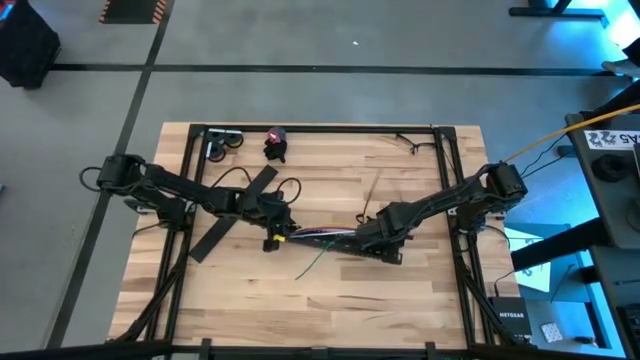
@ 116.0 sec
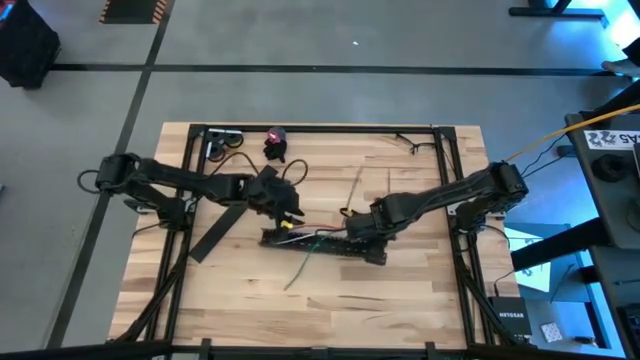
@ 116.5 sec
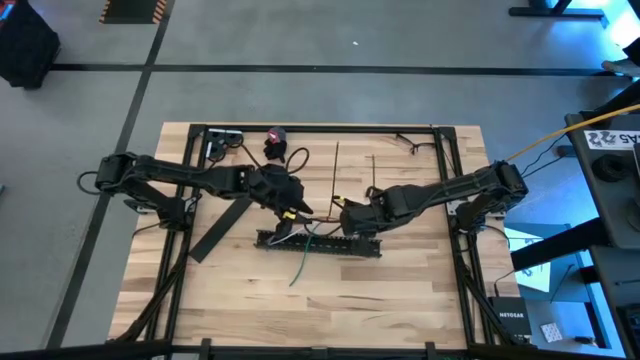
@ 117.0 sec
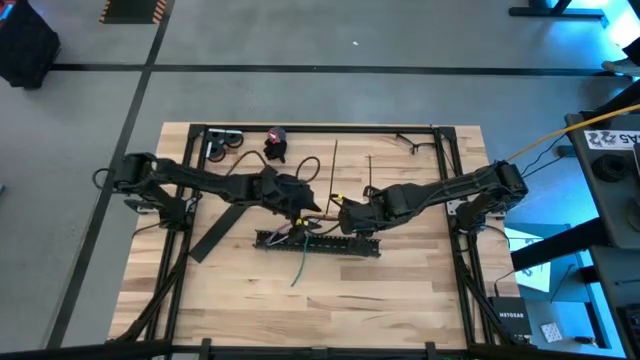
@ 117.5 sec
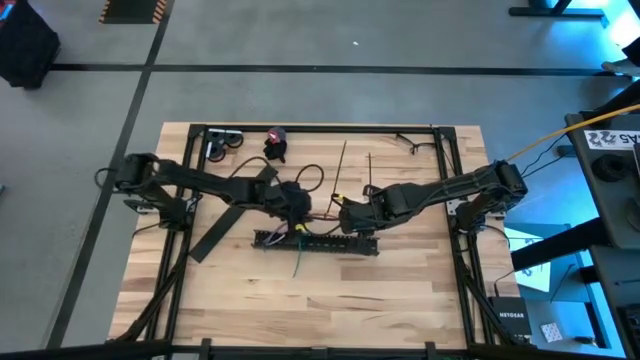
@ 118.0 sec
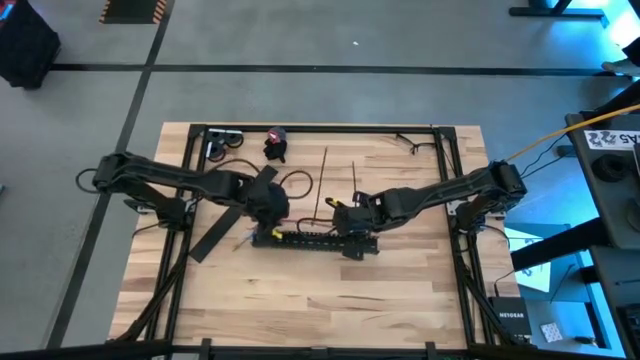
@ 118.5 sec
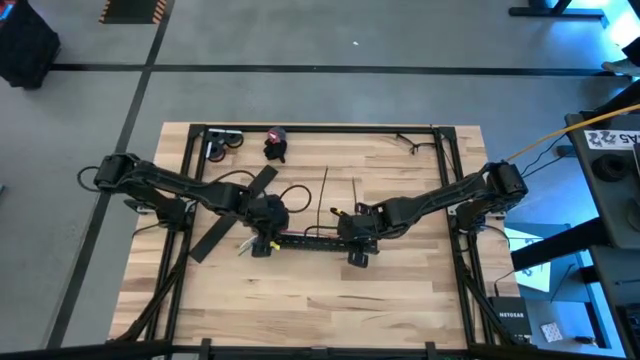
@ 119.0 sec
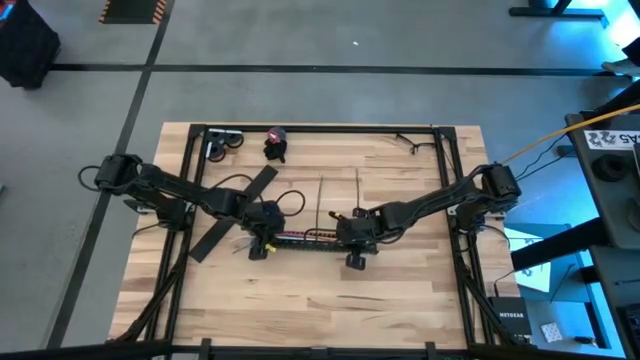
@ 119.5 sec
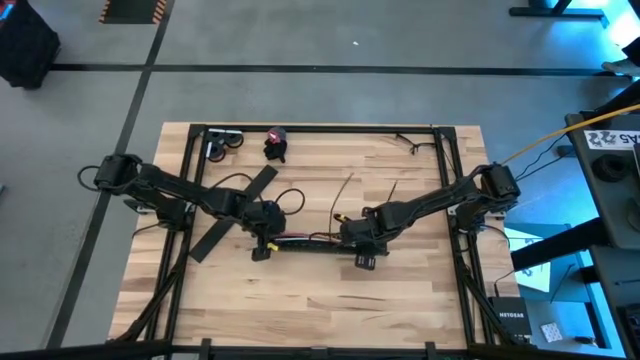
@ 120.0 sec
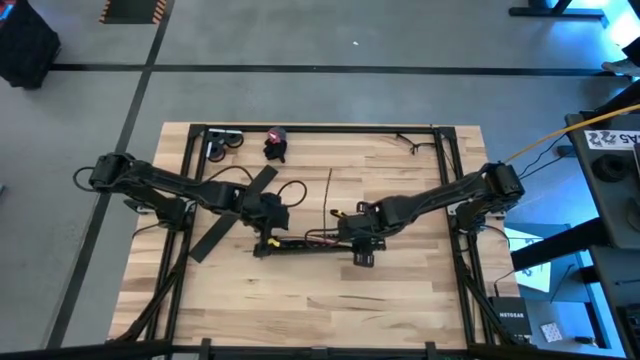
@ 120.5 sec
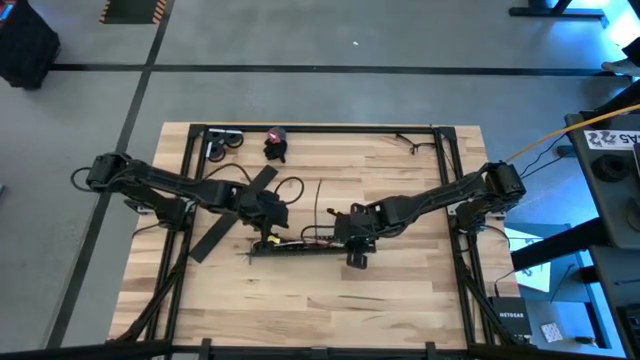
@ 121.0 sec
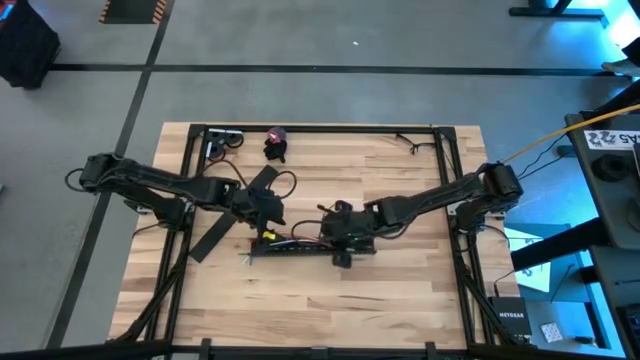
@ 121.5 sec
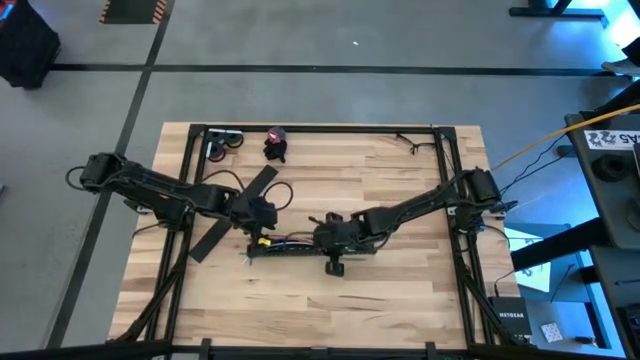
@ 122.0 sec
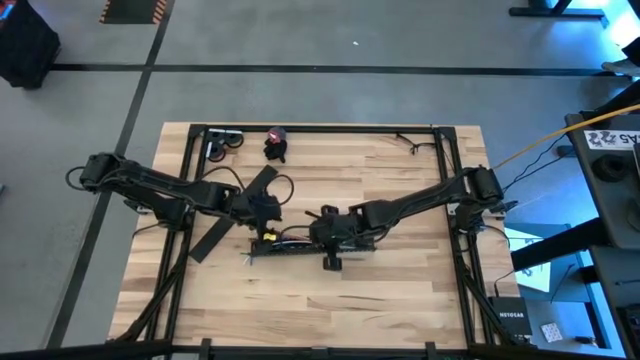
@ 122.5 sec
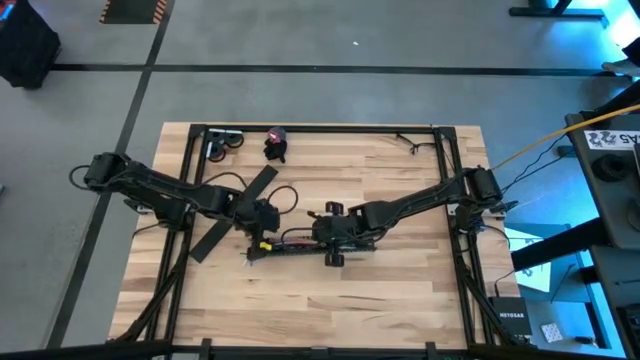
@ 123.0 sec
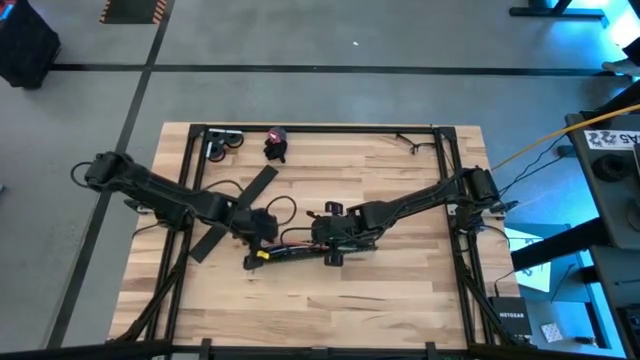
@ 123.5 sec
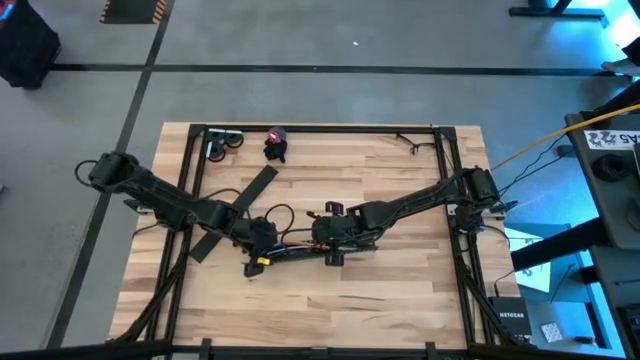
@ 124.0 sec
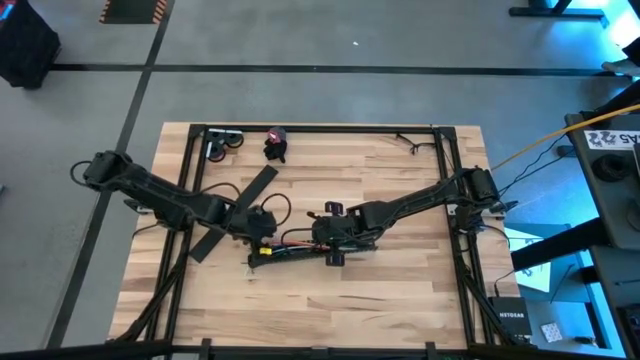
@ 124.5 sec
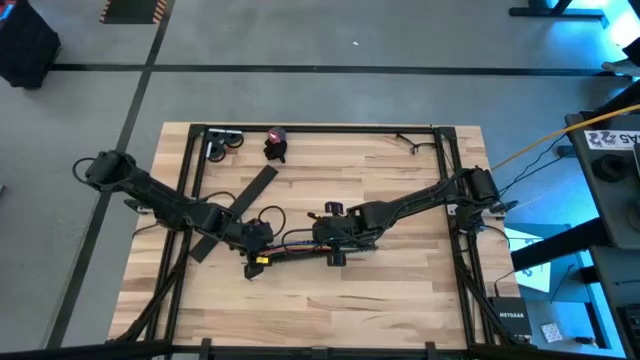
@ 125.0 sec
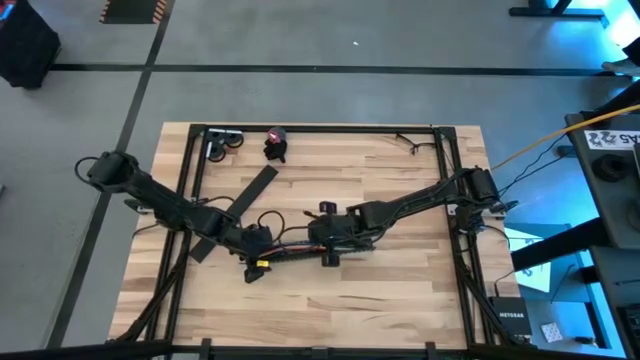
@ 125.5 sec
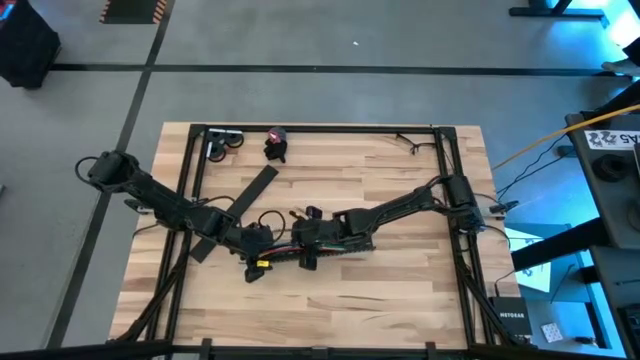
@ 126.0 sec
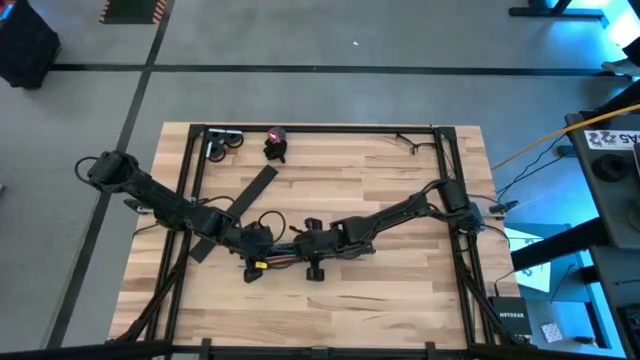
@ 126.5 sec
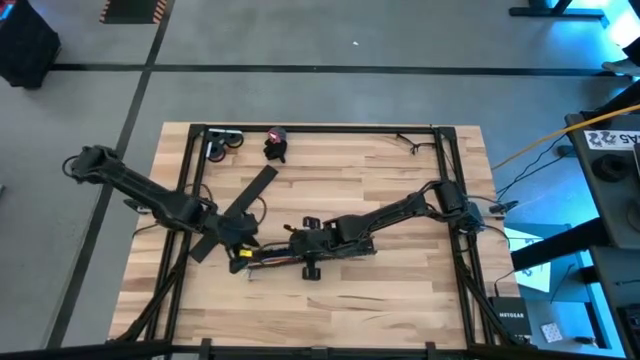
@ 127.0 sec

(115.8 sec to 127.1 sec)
Task: Ziptie cables
Put the ziptied cable wires into the black cable duct

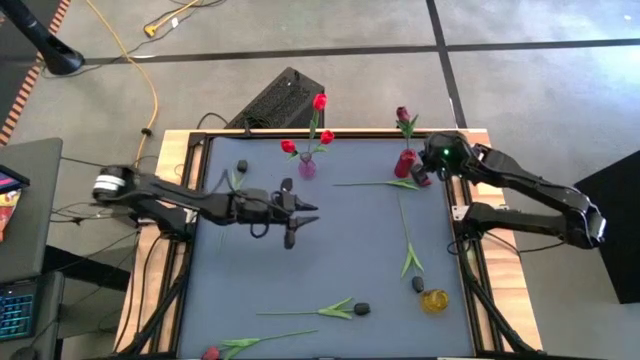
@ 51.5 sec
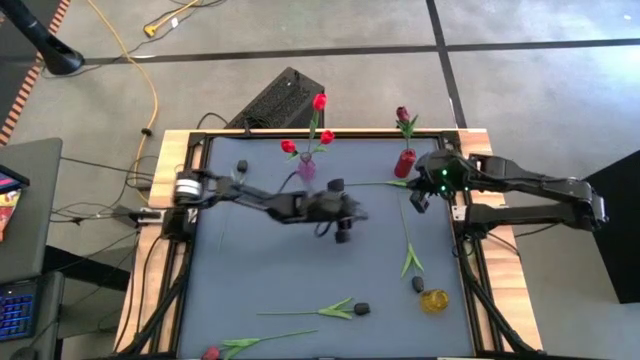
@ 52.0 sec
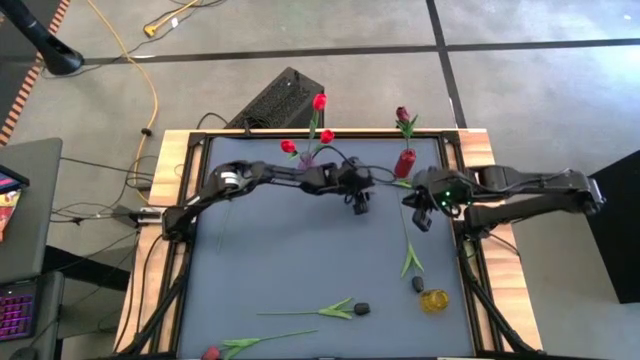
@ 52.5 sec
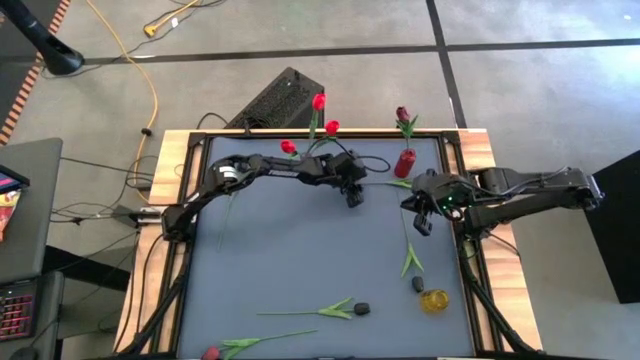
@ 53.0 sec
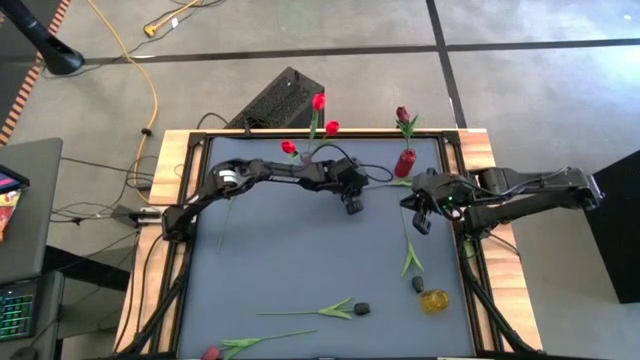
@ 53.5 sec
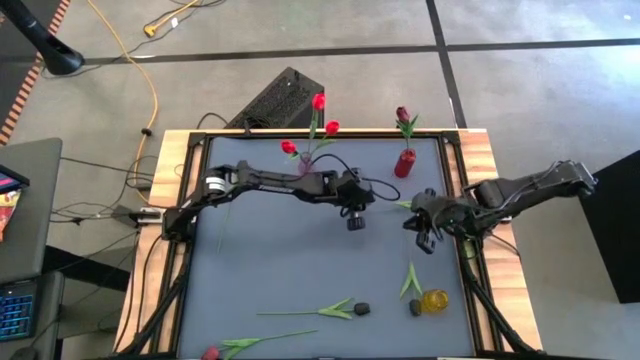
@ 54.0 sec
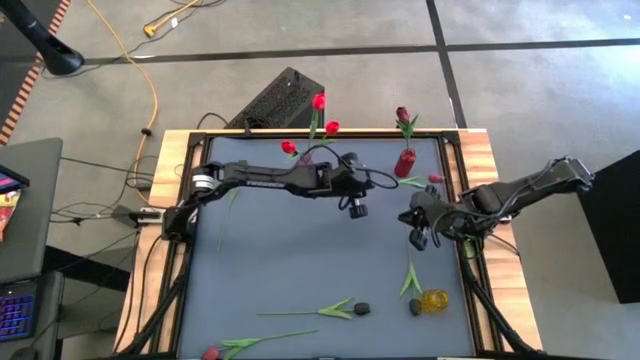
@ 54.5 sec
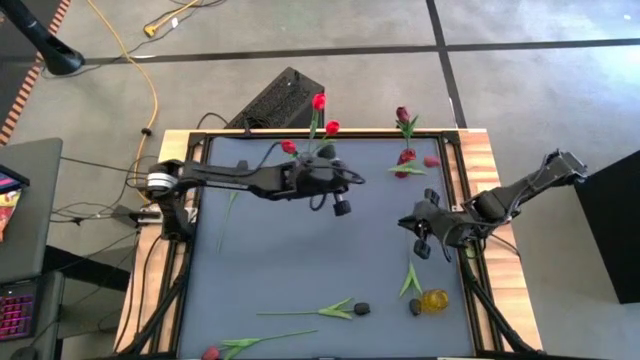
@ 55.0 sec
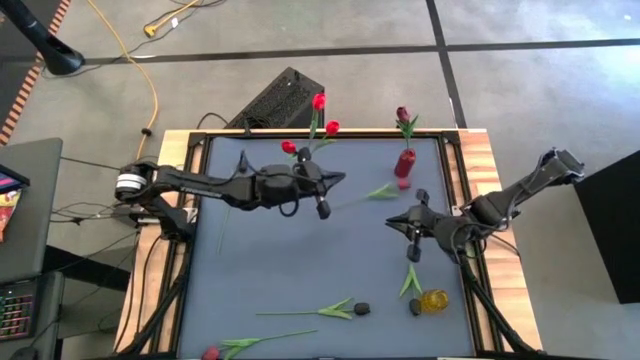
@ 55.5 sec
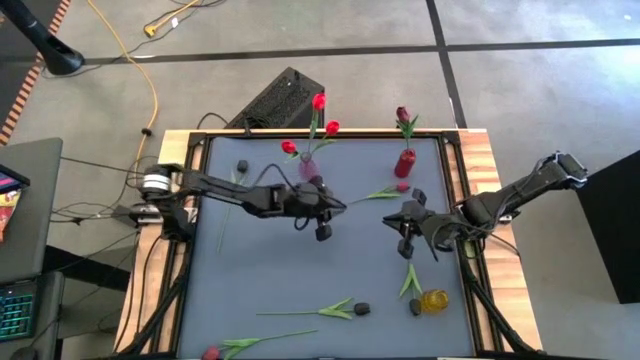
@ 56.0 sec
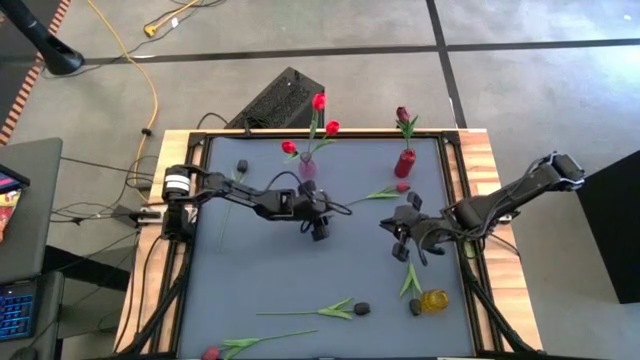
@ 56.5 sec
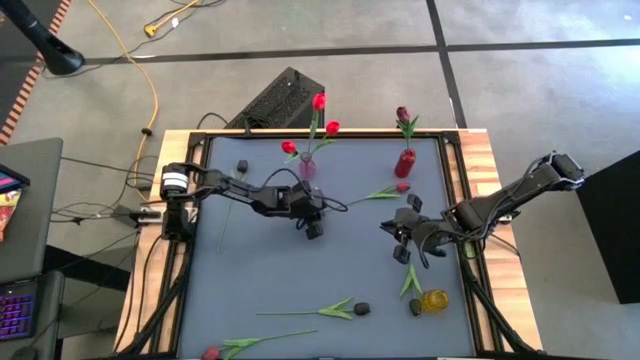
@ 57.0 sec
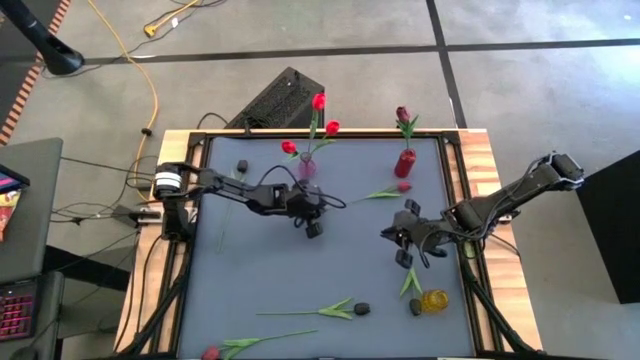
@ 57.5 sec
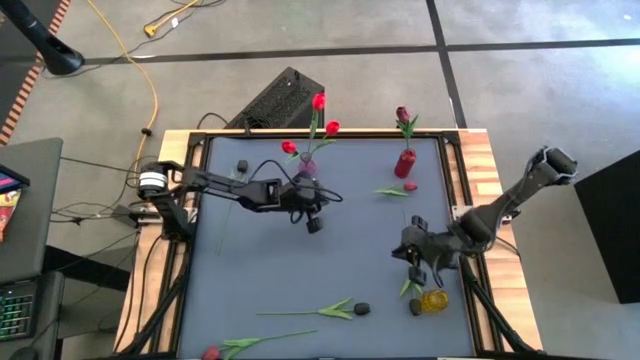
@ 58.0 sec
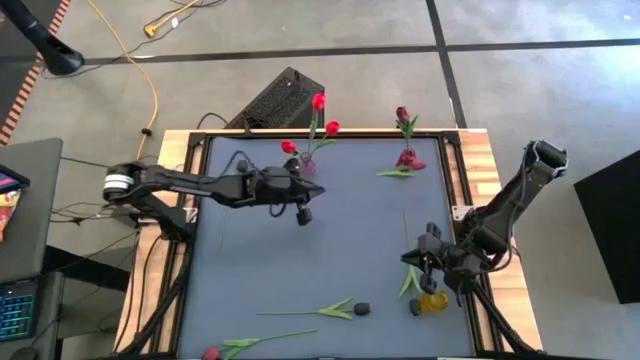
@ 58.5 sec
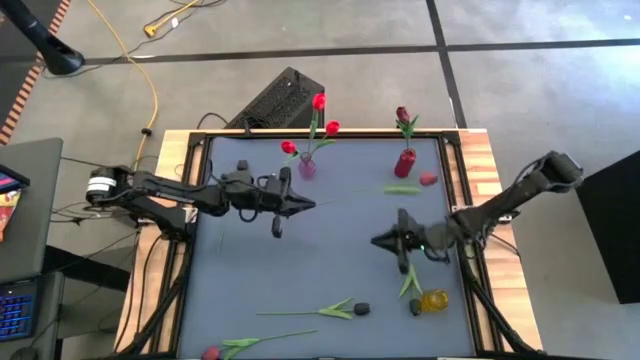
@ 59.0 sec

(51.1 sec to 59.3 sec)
Task: Sort flowers into vase by color
Put the top red flower into the red vase
